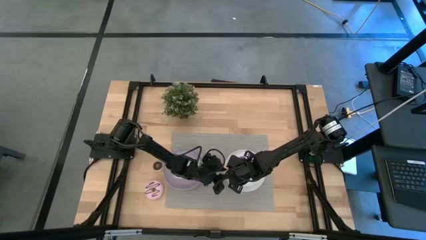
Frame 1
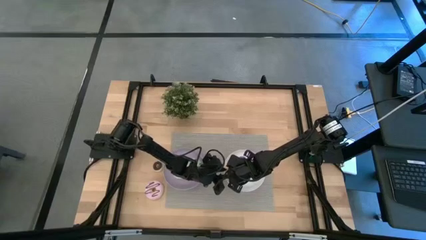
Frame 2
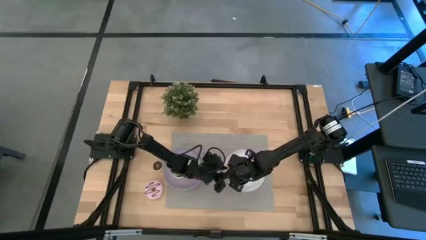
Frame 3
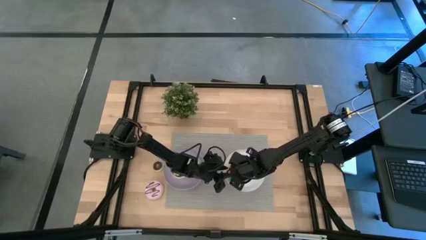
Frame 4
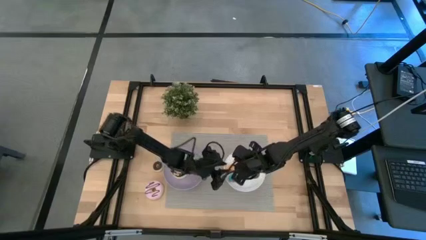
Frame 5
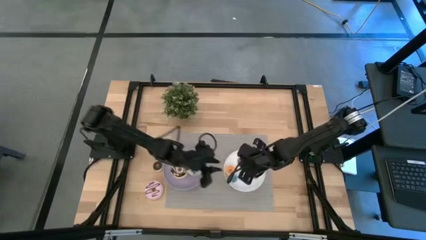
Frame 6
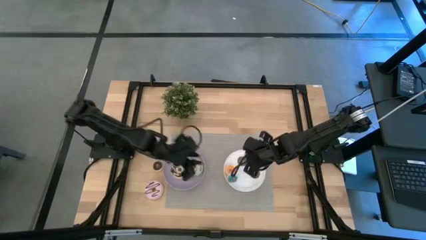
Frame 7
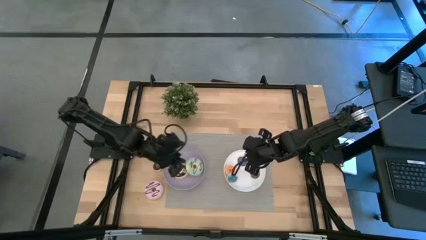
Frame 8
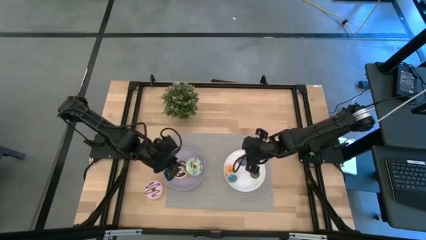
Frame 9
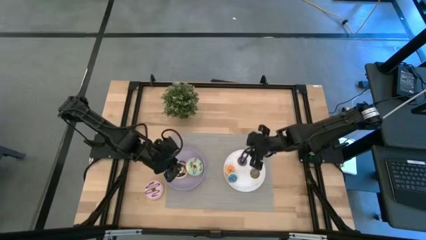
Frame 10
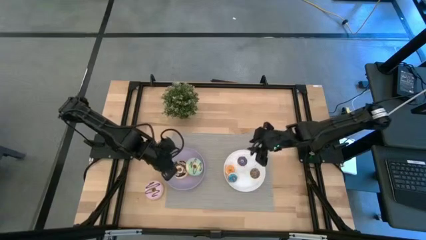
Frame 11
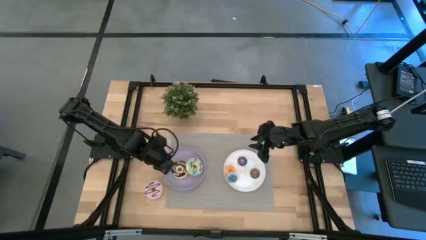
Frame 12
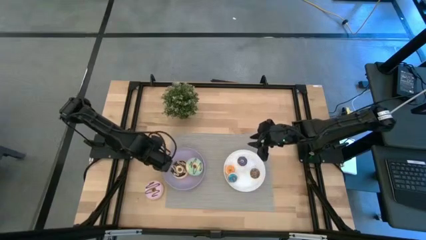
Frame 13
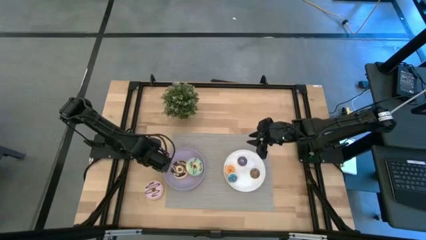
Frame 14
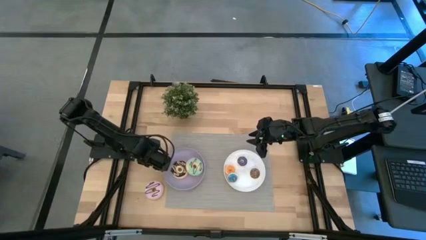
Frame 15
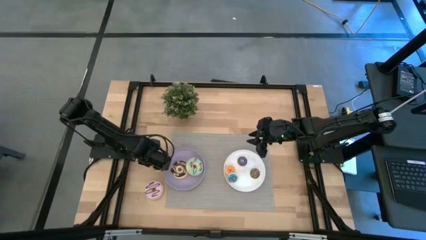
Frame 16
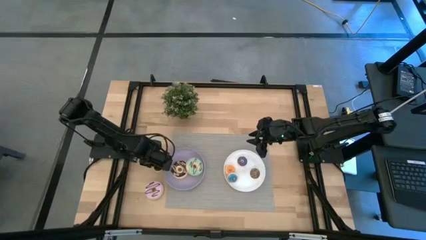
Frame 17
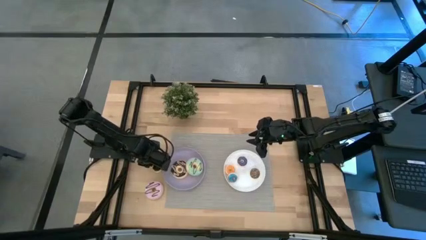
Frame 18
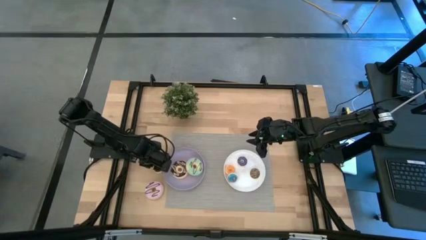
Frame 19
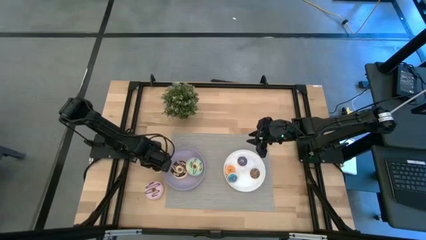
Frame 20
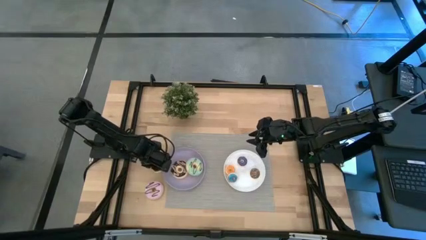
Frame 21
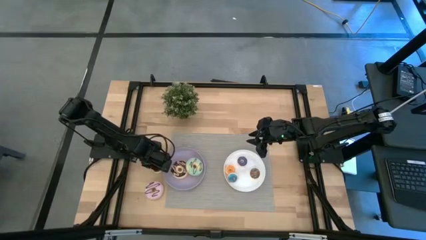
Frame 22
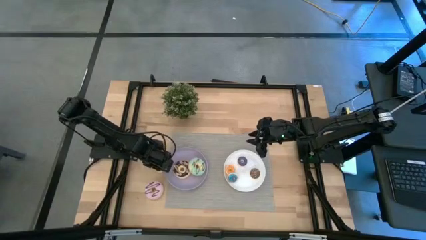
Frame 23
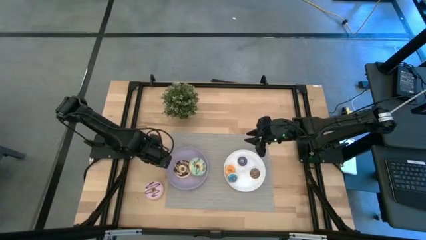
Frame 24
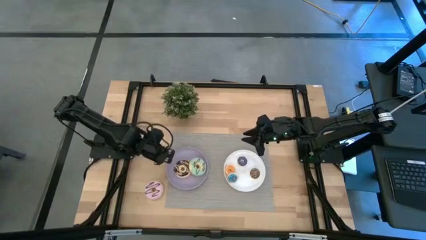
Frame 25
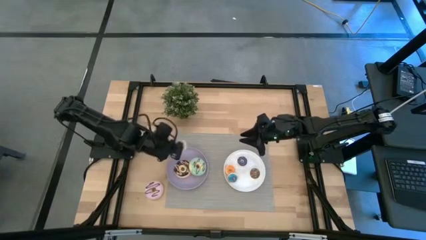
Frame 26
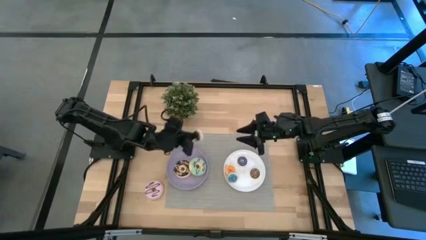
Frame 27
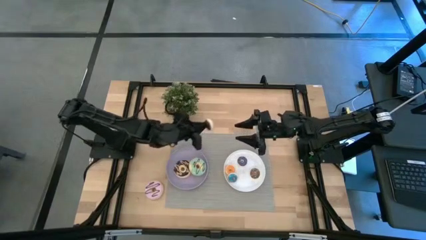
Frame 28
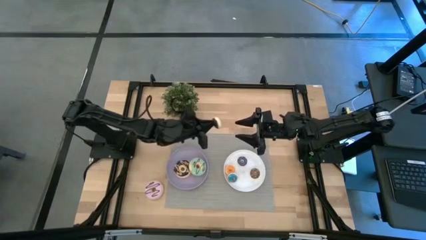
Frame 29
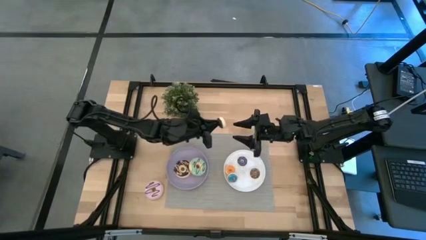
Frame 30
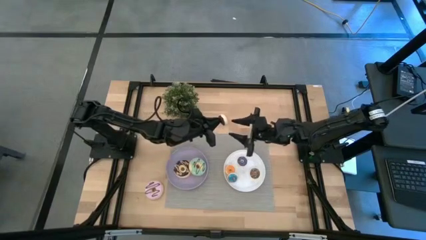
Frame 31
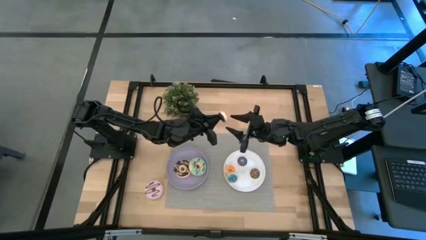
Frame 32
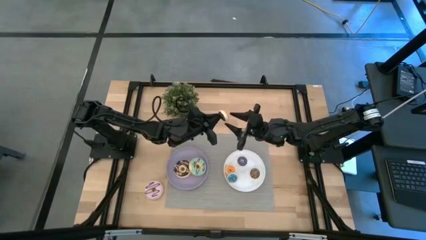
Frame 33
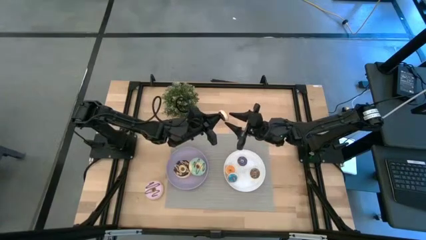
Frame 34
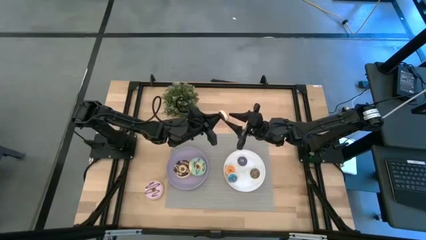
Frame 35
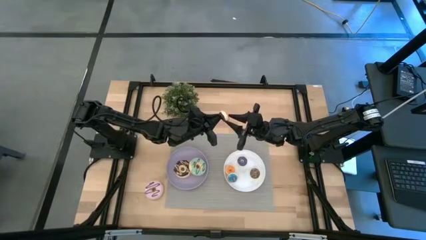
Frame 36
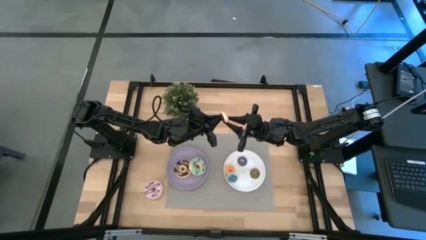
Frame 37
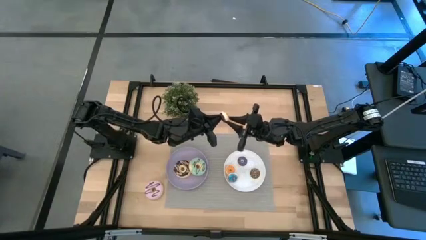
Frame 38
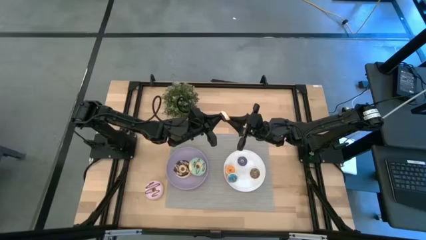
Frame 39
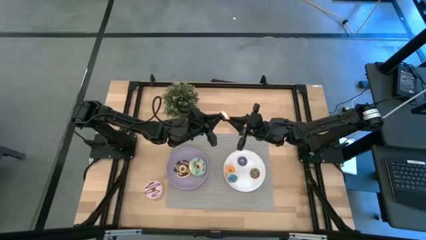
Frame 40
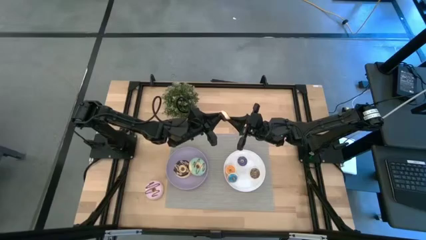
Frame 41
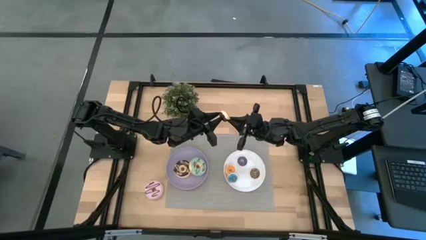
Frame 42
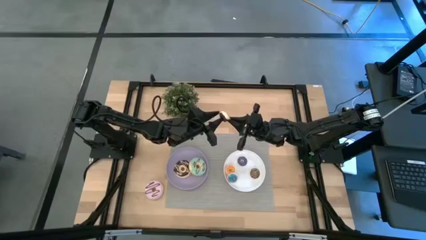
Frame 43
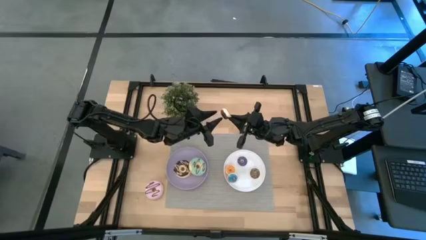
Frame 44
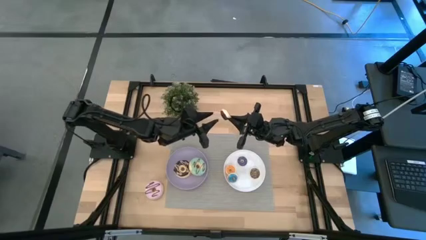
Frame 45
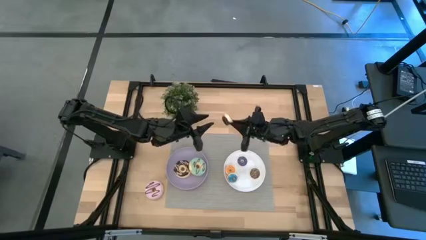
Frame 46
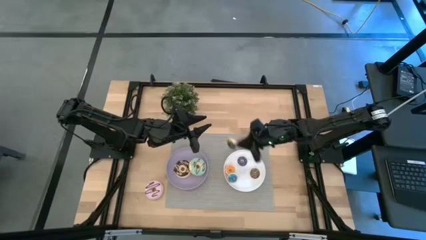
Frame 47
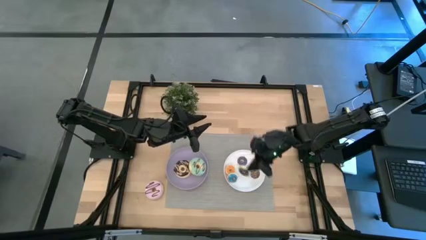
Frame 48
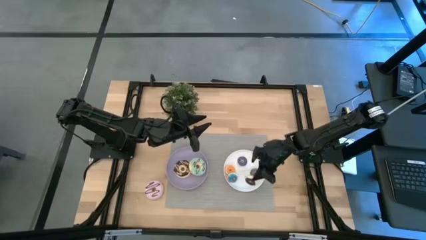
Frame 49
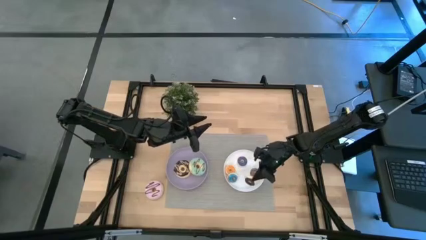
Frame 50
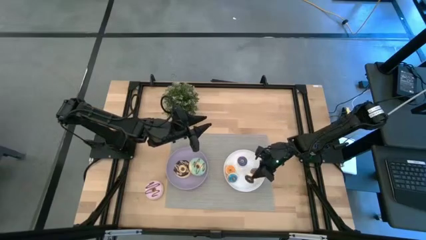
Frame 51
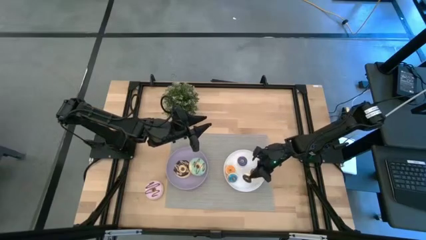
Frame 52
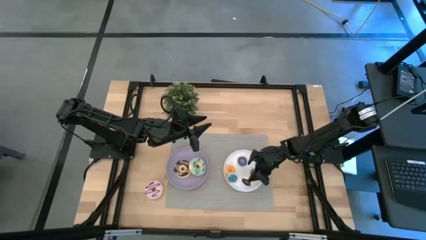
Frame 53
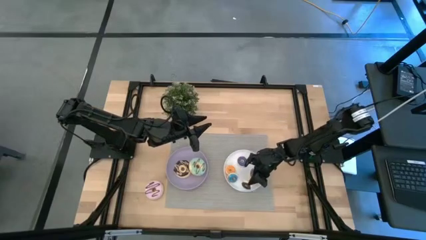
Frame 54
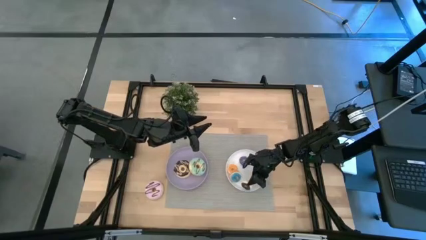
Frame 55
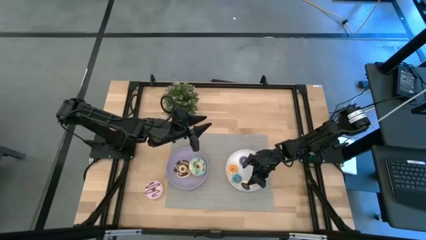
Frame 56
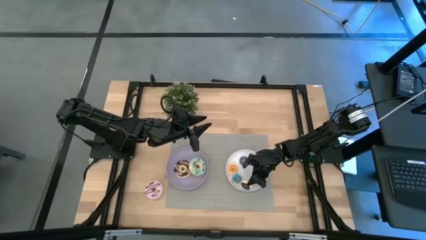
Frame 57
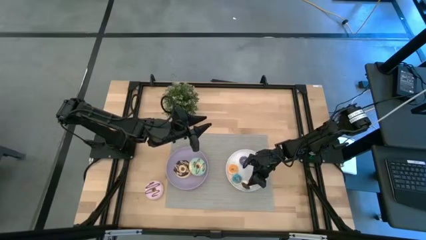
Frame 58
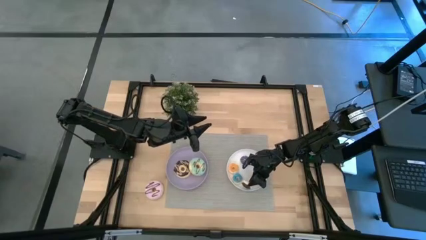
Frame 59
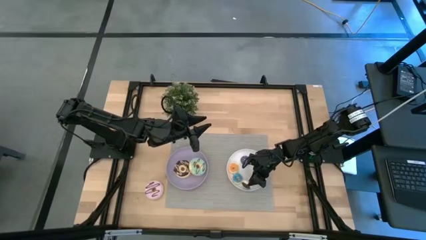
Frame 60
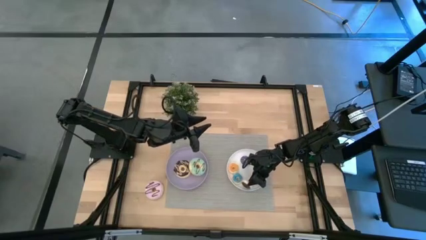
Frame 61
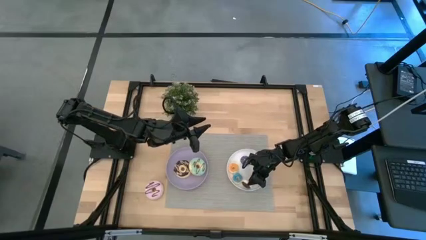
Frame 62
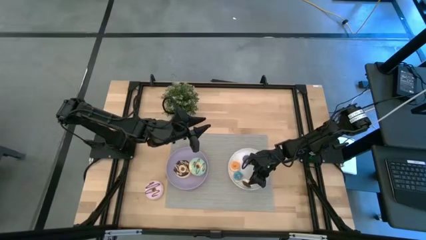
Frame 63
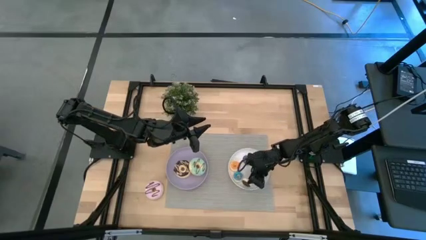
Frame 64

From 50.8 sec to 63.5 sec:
Task: Pick & Place donuts
Put the small dark brown donut on the white plate

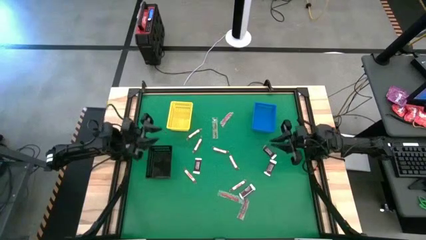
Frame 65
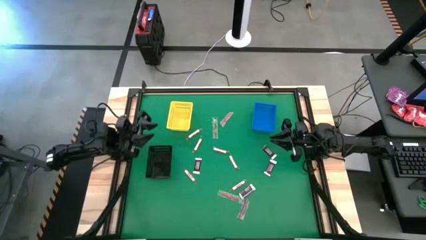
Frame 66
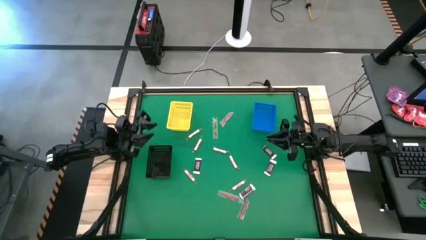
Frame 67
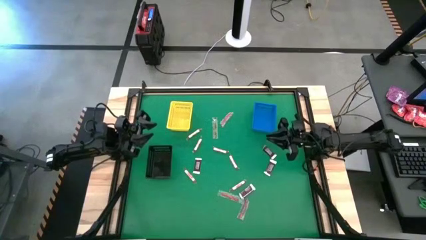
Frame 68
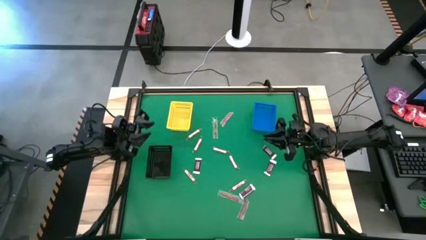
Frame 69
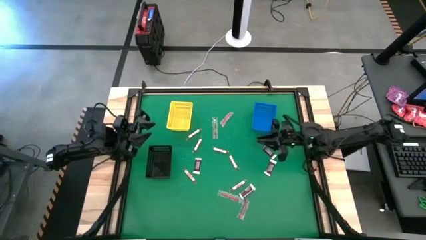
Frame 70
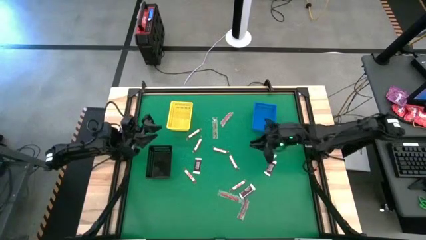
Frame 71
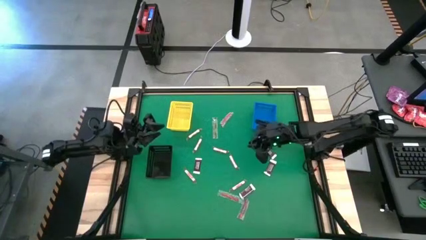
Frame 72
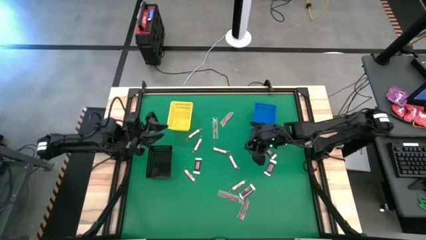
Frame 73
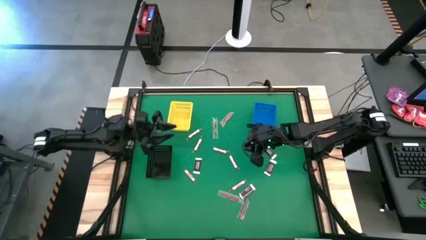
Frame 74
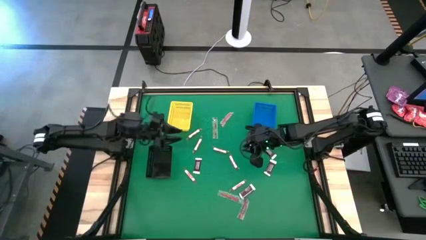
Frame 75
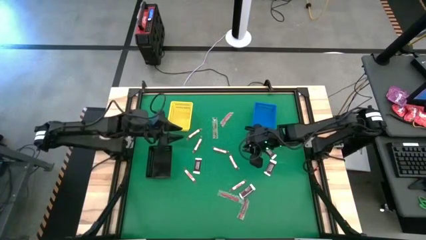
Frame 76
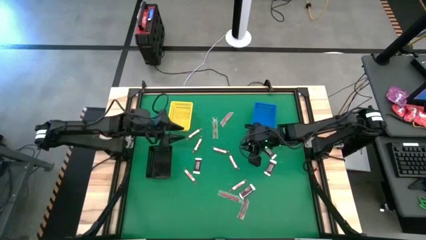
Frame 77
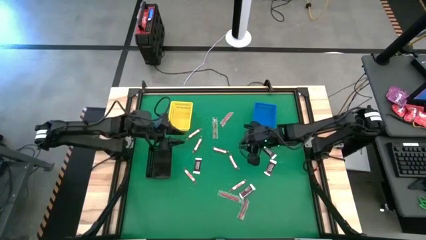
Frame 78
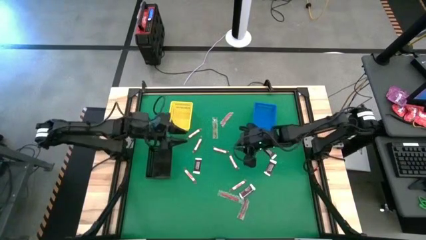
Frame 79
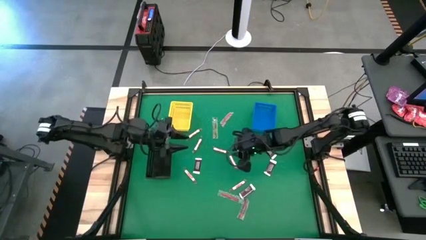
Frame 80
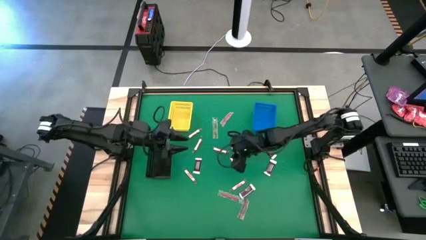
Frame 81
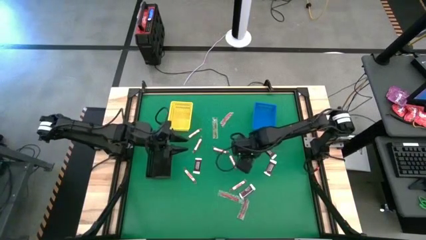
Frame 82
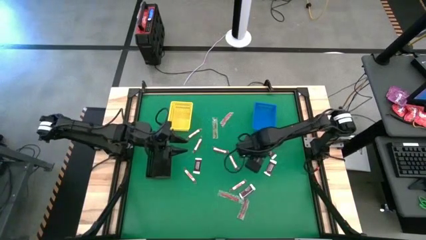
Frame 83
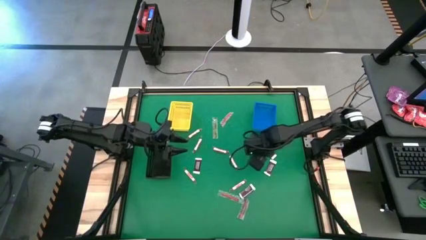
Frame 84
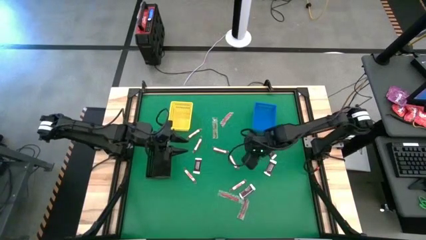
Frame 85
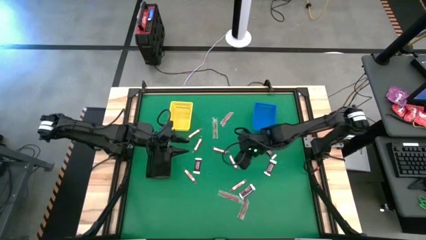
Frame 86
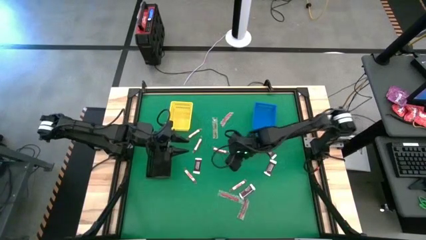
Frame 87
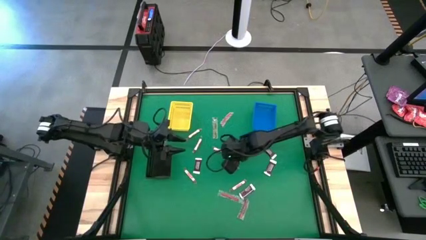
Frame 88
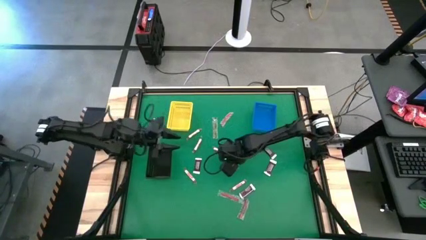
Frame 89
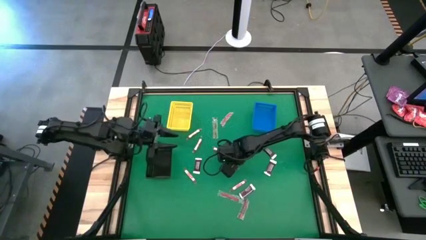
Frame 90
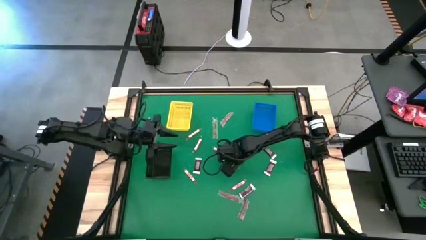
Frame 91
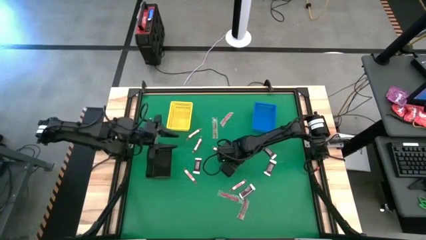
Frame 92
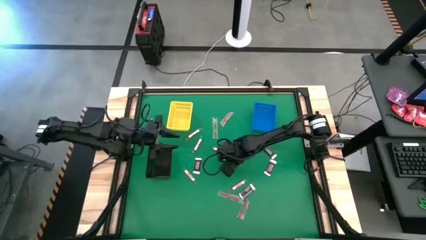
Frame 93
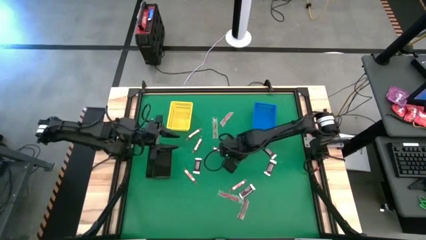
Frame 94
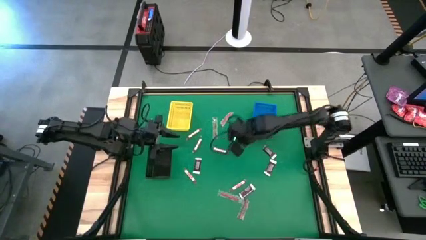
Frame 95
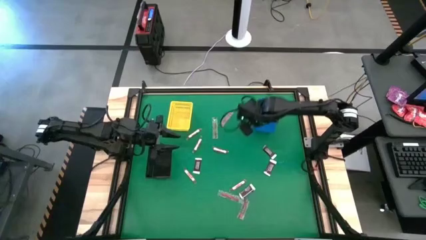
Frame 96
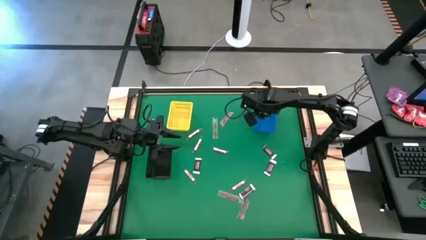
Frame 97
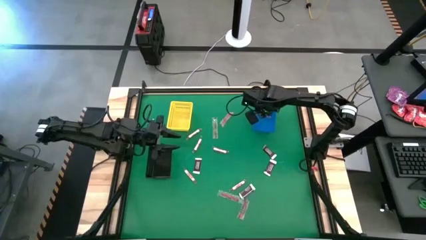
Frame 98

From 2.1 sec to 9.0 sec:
Task: Sort candy by brand, put in halloween buckets
Put the white candy stick into the blue bin
